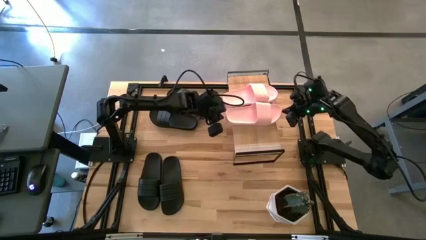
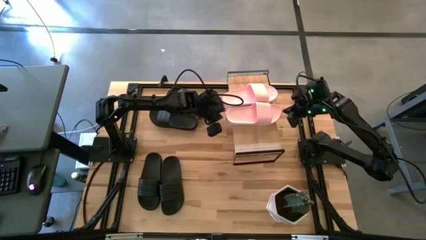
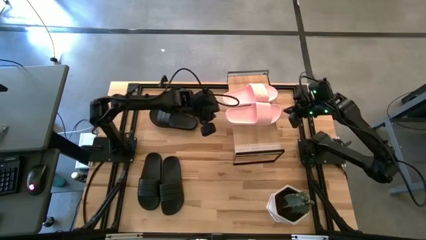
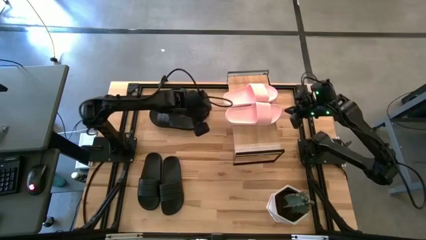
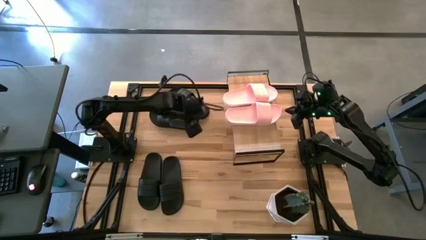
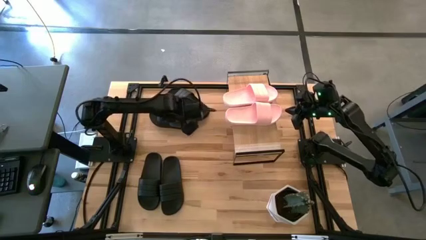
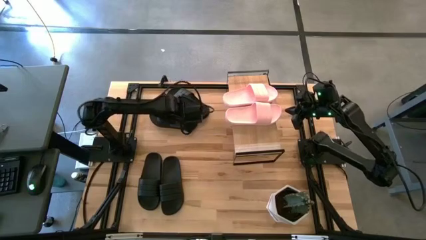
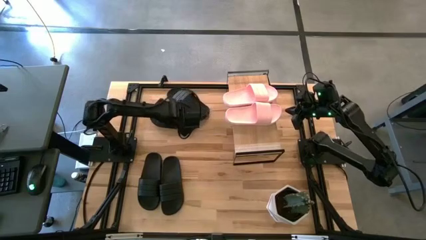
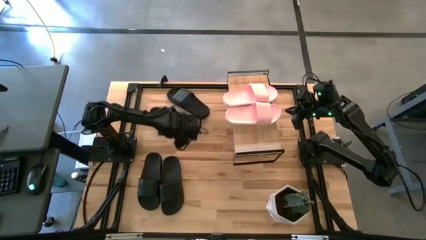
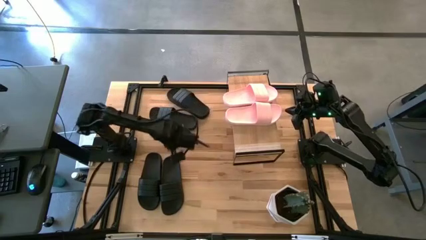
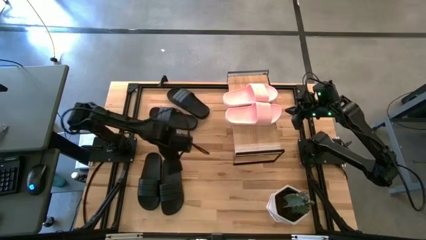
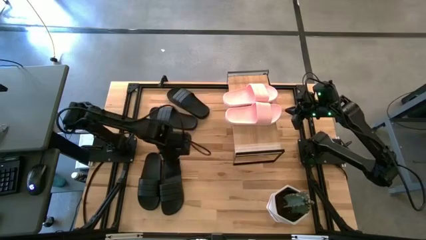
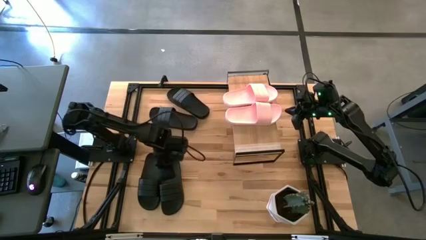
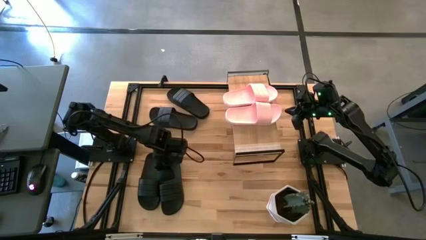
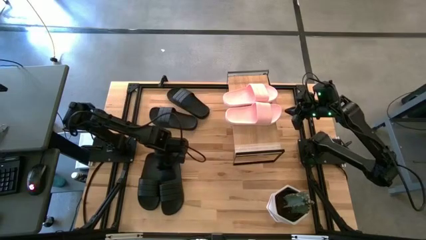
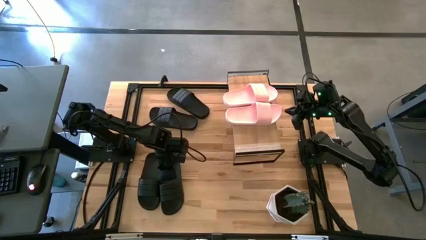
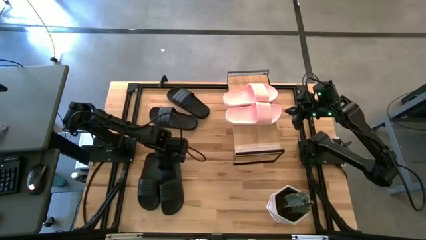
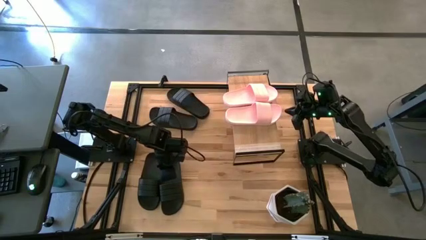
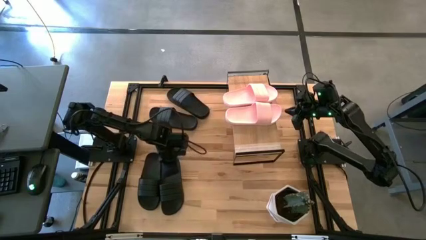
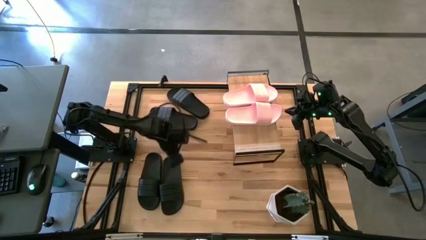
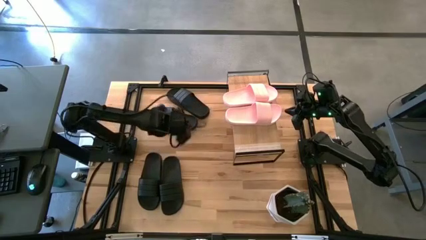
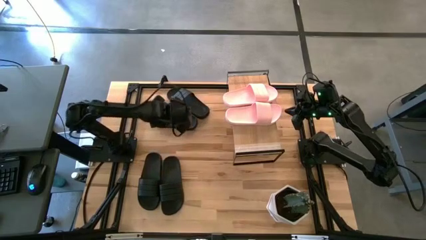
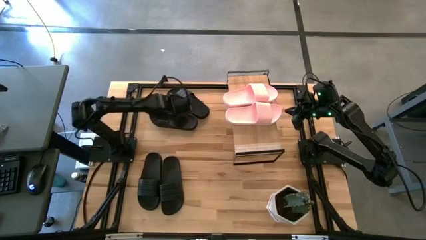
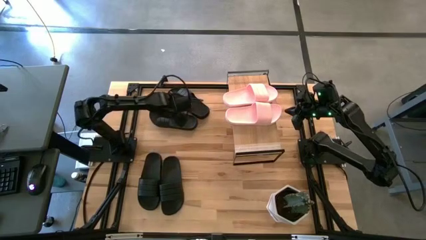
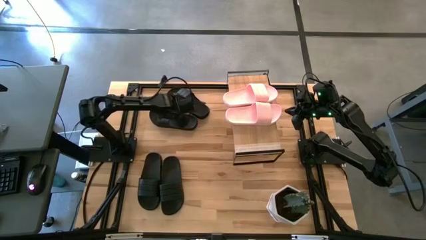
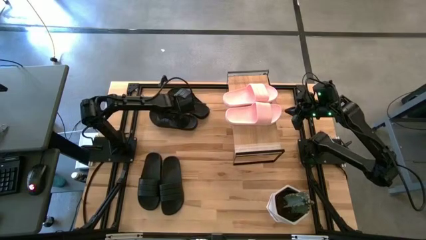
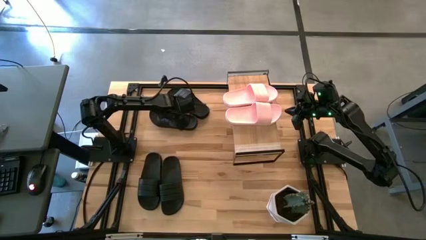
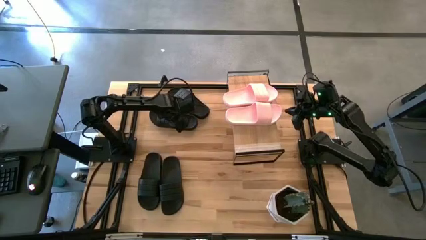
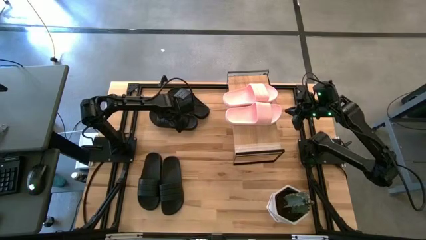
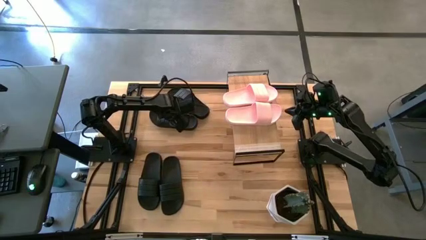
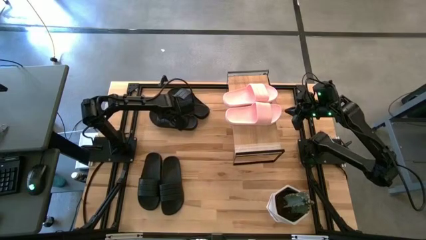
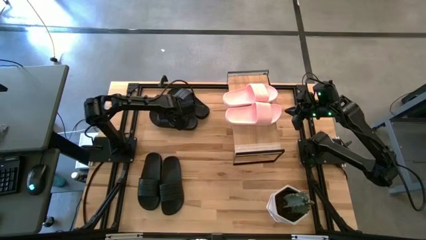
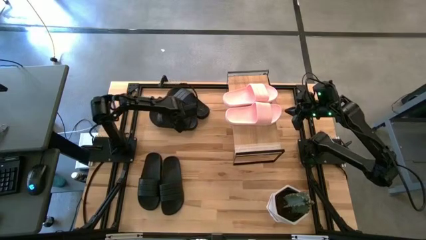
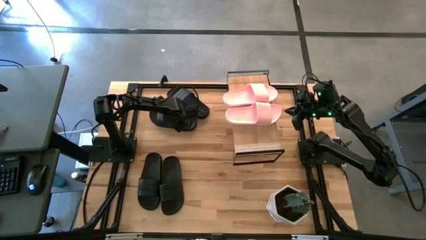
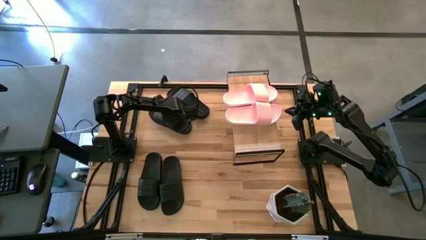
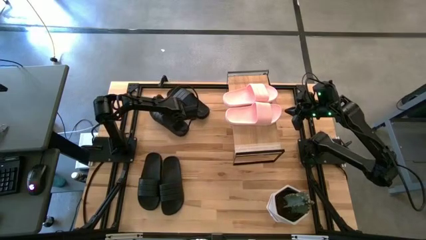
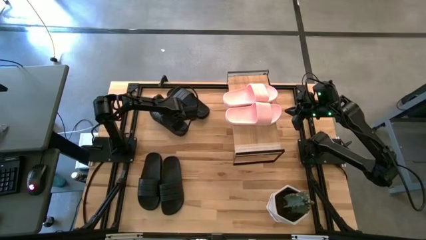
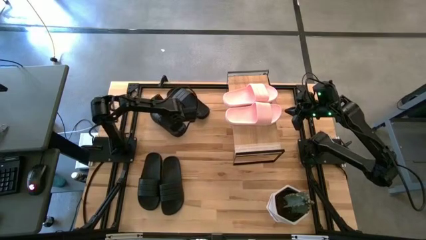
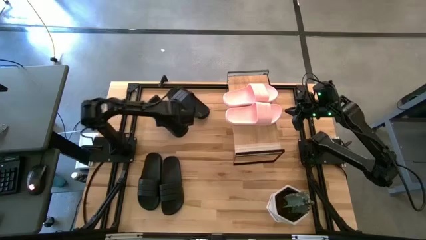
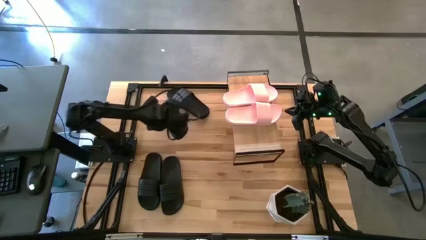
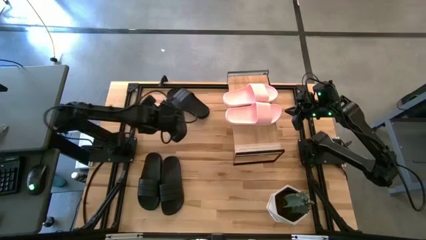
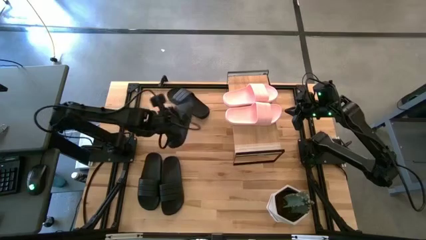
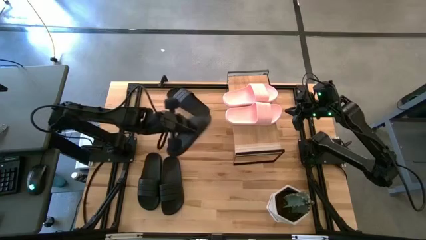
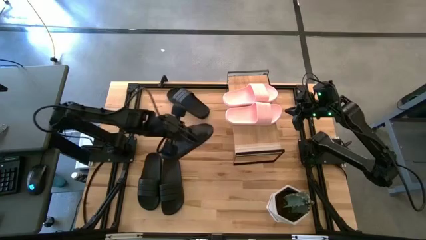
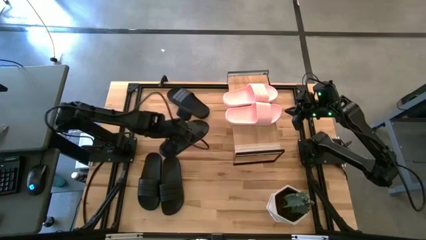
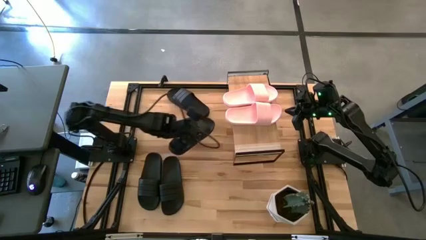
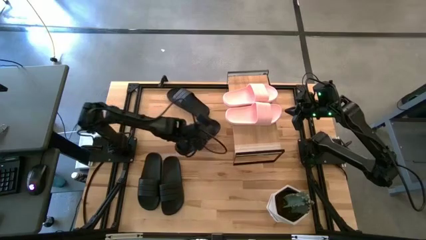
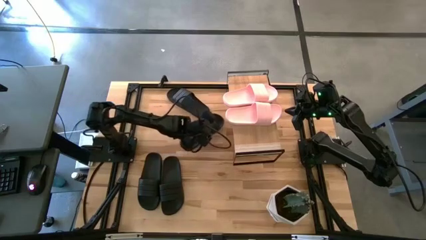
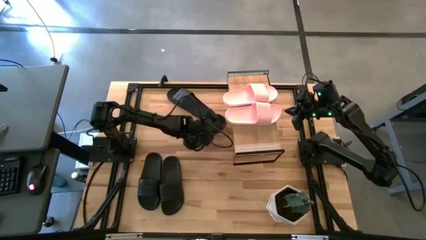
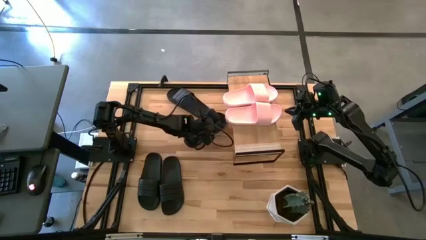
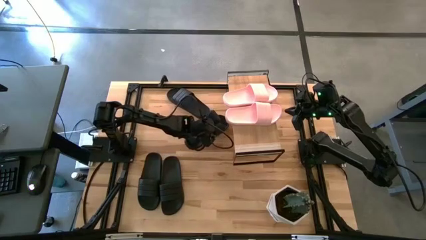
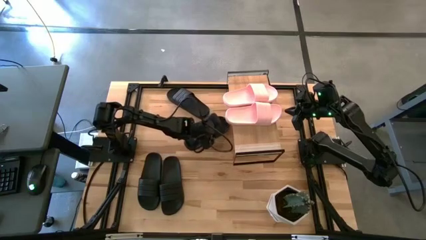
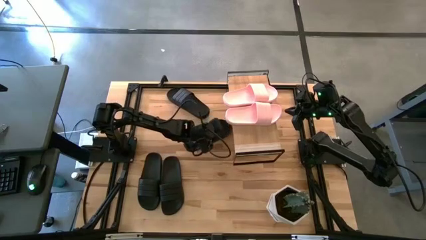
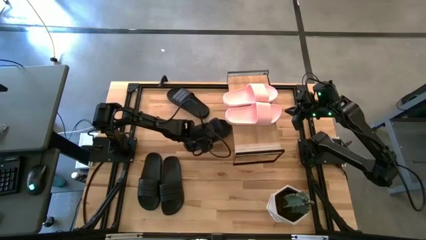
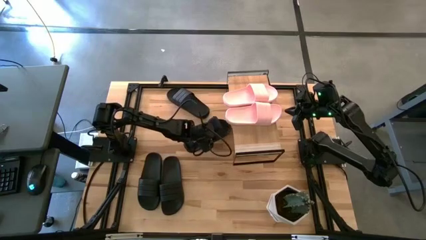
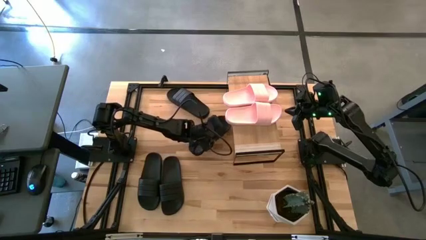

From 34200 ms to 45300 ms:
Task: Pick and place slides into the shelf
Put the black slide under the shelf

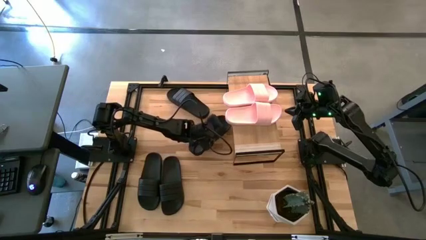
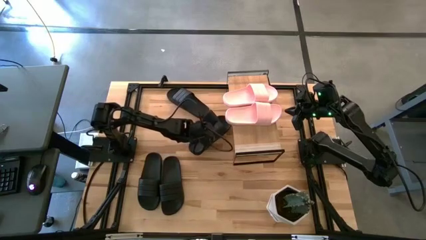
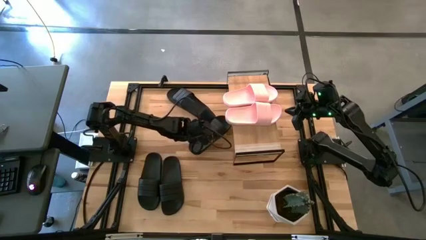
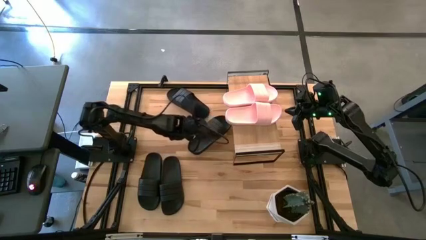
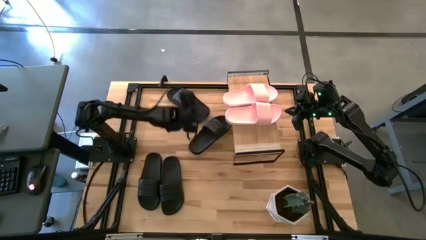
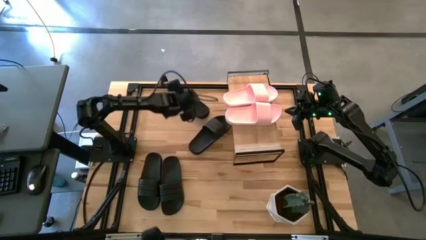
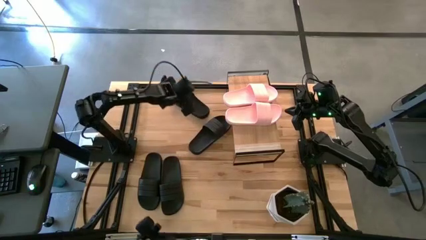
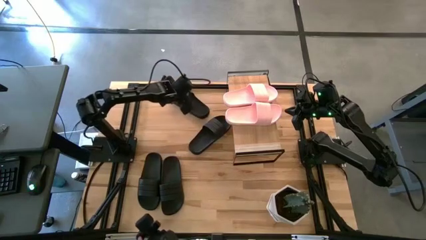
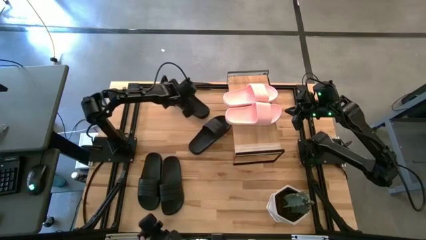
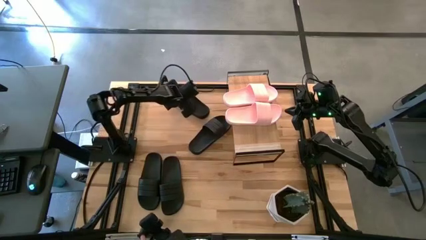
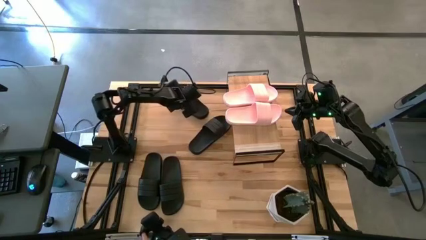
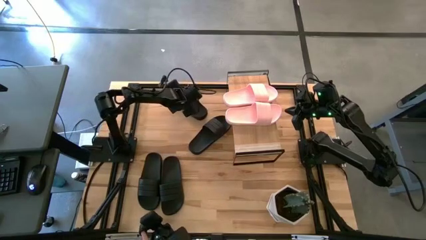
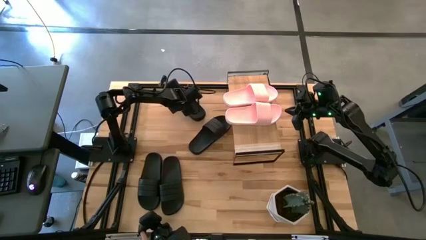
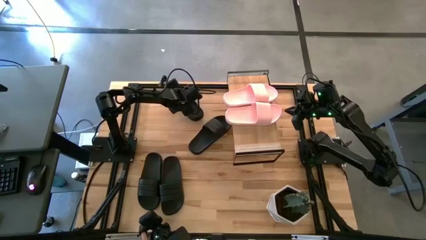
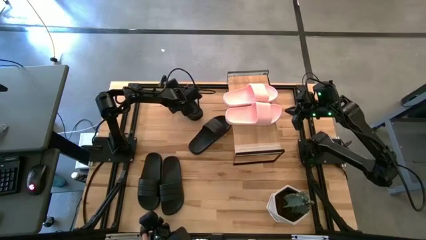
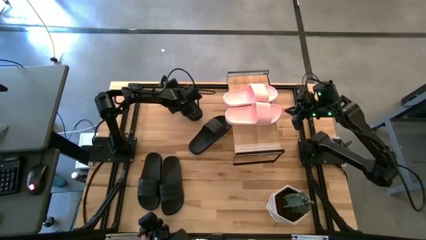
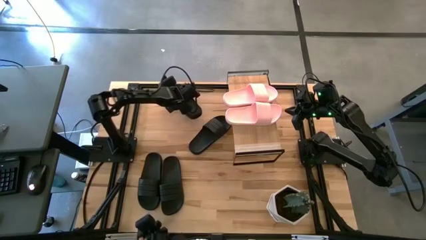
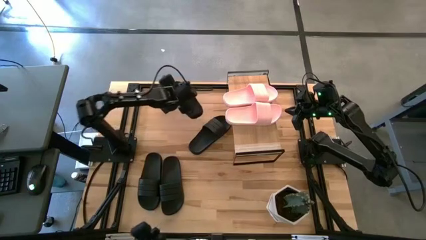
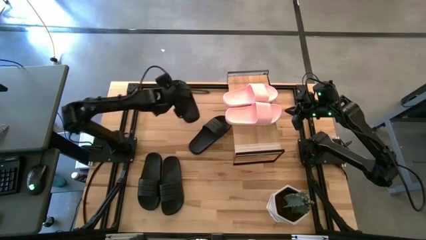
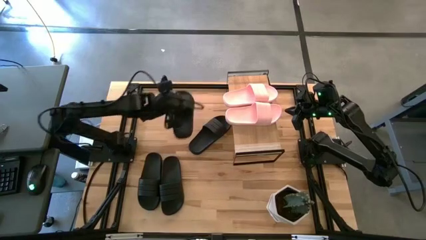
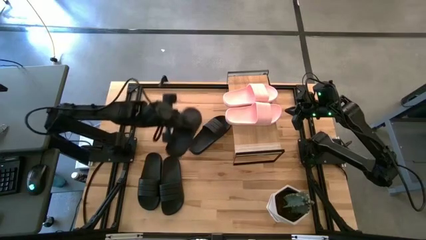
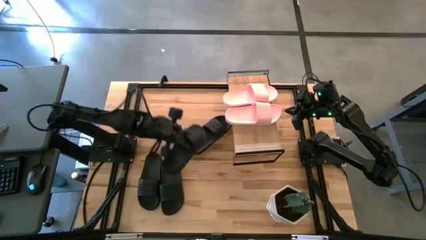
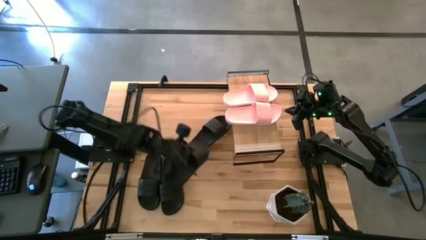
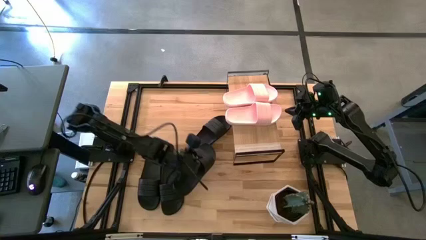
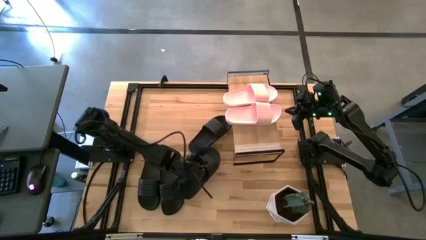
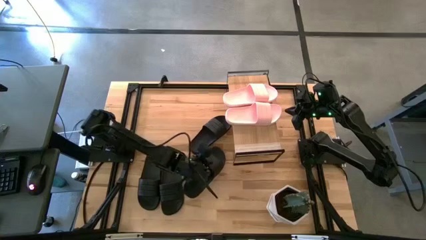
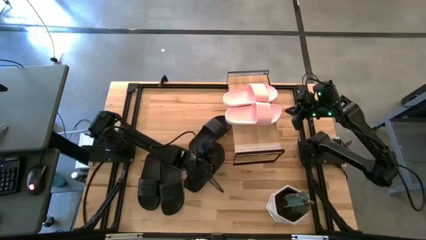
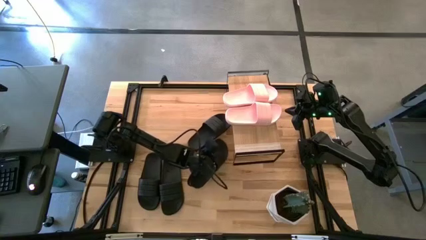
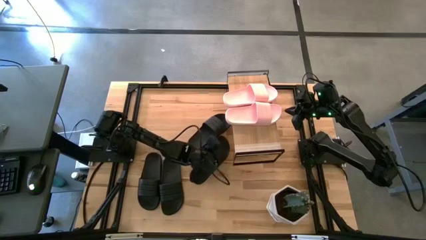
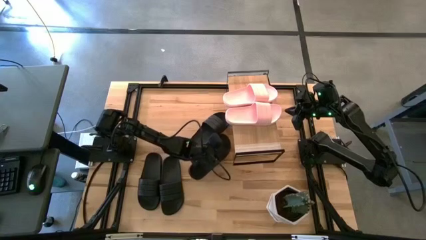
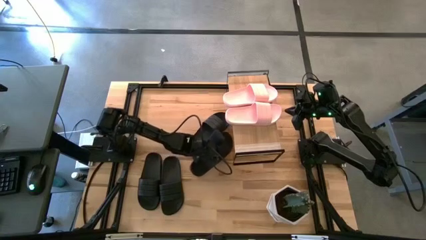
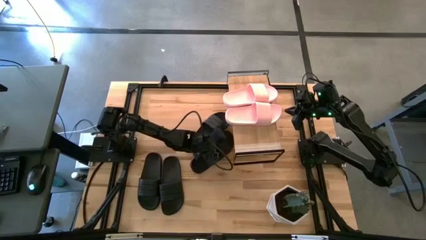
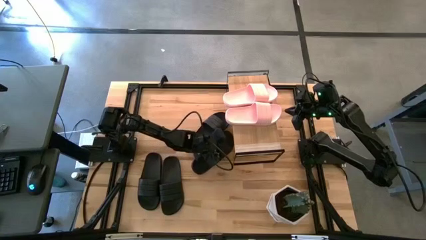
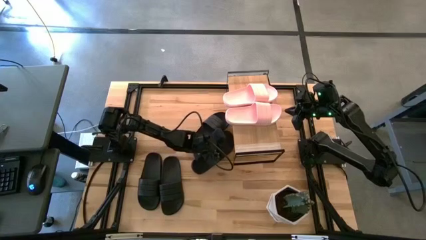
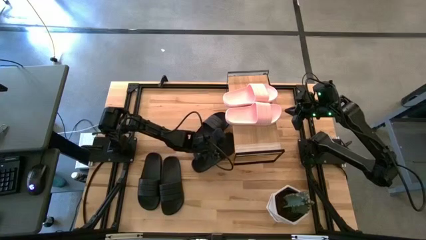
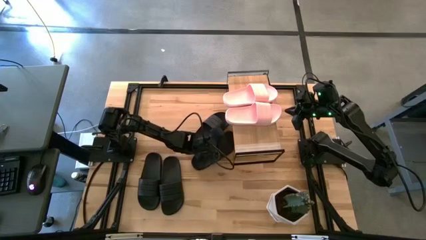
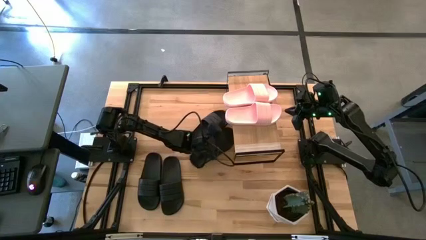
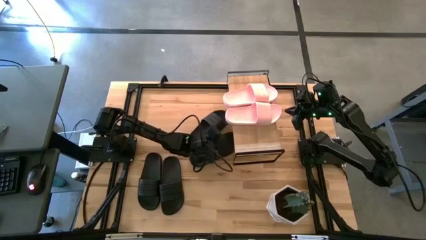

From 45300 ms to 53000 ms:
Put the black slide under the shelf
